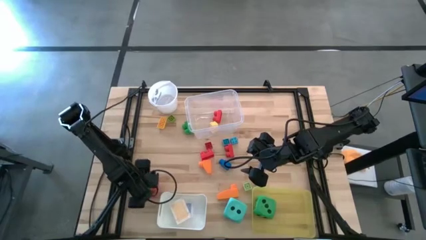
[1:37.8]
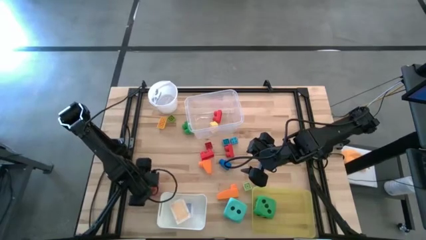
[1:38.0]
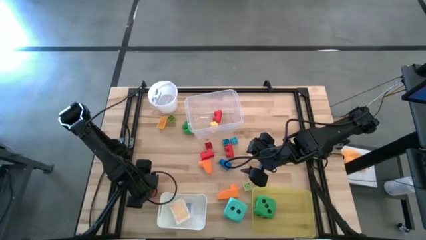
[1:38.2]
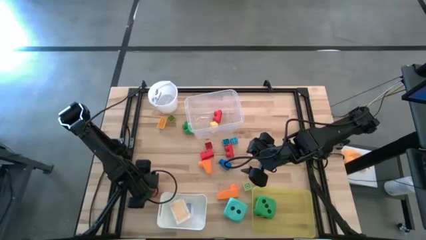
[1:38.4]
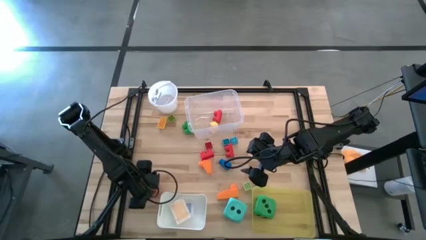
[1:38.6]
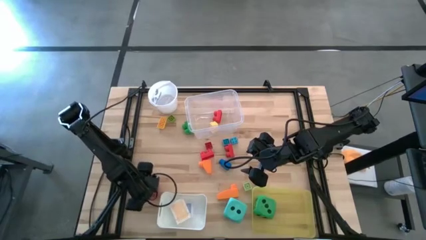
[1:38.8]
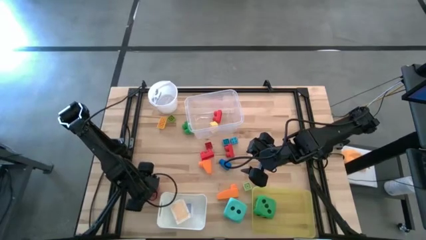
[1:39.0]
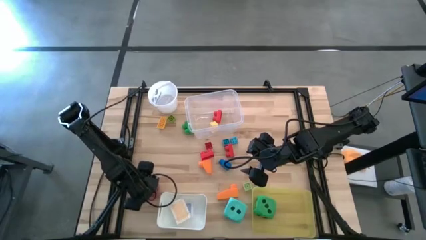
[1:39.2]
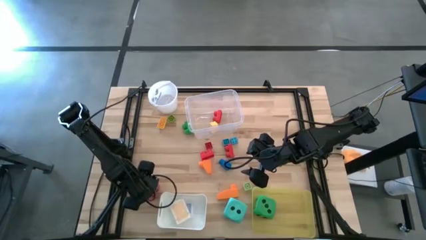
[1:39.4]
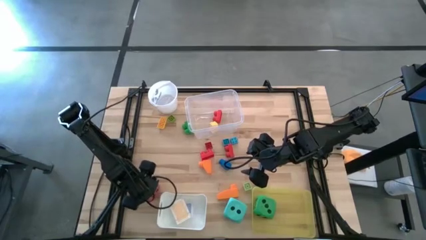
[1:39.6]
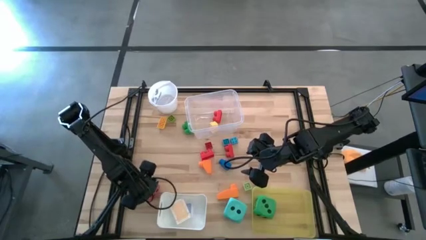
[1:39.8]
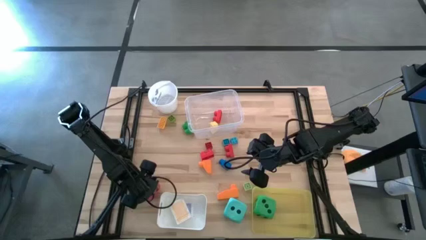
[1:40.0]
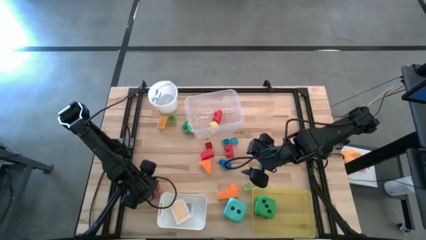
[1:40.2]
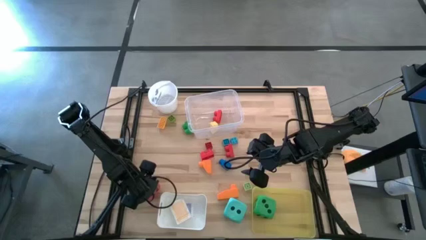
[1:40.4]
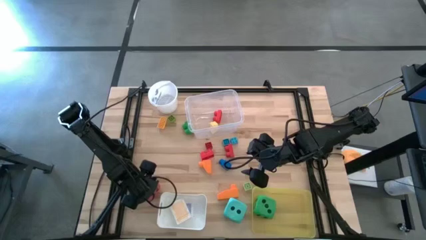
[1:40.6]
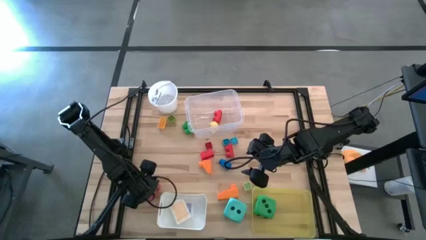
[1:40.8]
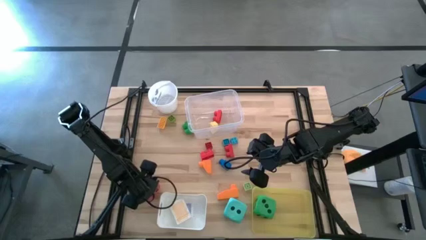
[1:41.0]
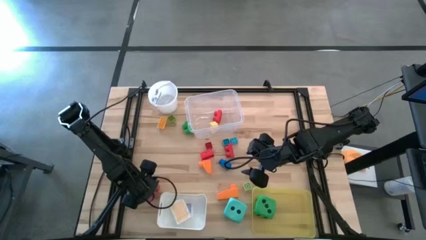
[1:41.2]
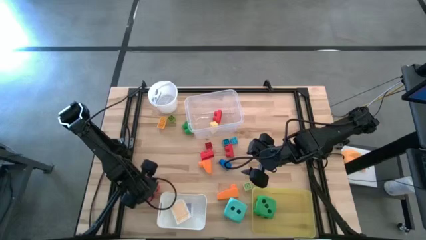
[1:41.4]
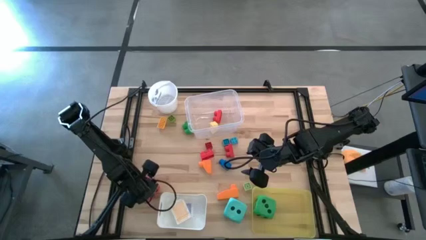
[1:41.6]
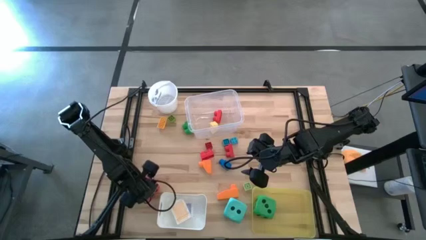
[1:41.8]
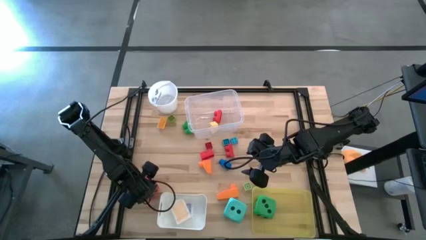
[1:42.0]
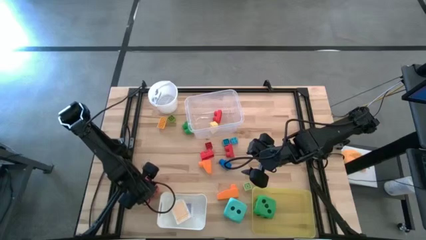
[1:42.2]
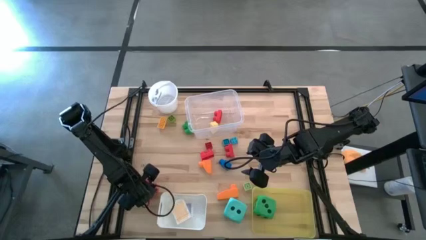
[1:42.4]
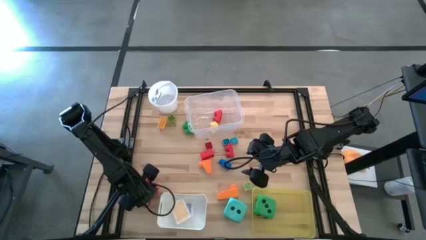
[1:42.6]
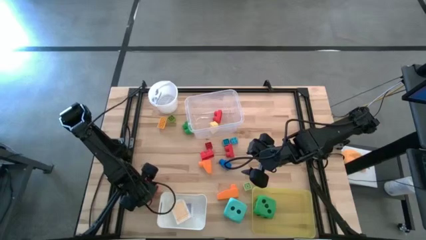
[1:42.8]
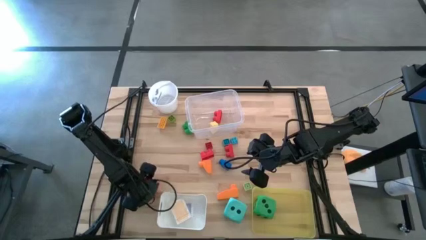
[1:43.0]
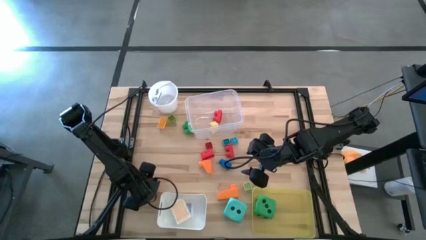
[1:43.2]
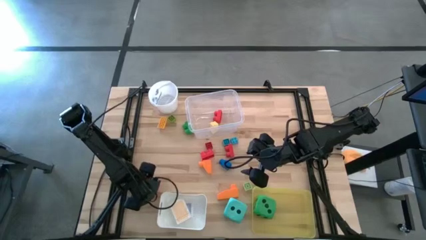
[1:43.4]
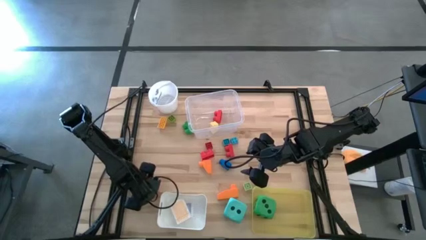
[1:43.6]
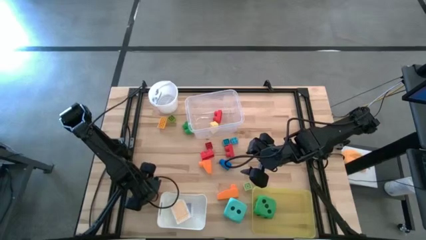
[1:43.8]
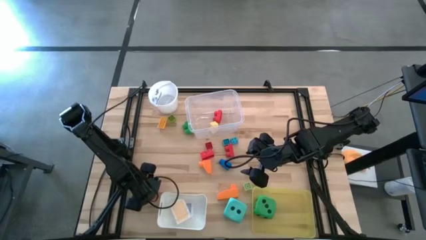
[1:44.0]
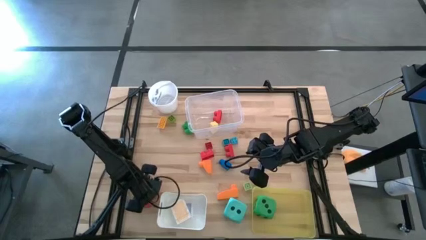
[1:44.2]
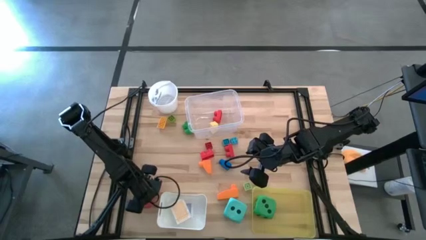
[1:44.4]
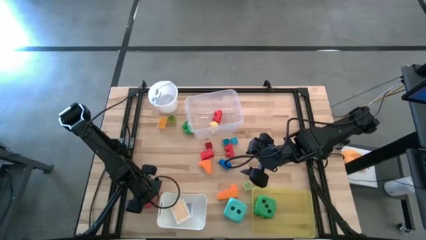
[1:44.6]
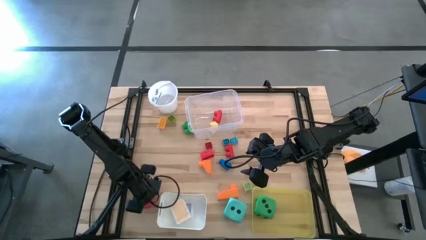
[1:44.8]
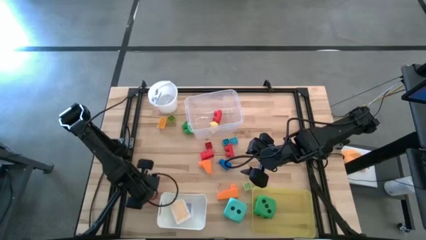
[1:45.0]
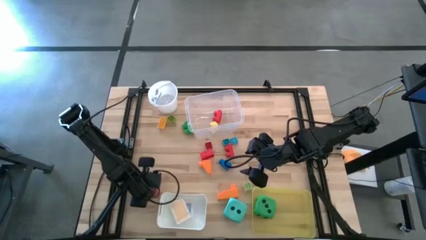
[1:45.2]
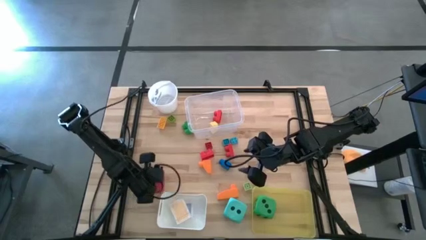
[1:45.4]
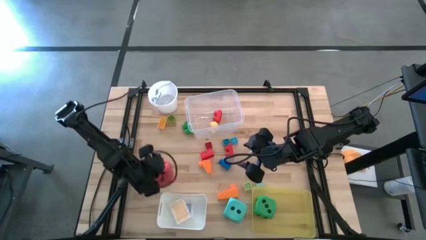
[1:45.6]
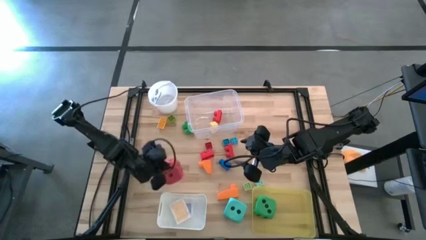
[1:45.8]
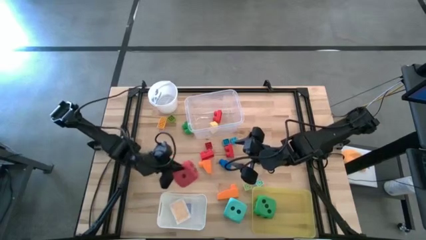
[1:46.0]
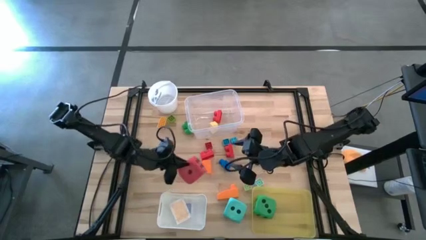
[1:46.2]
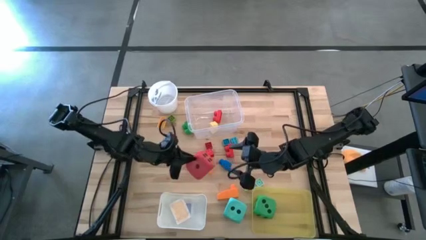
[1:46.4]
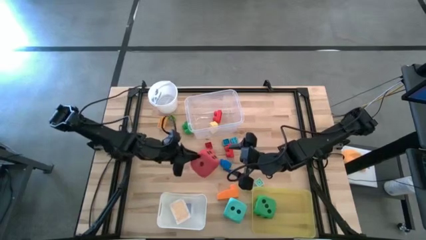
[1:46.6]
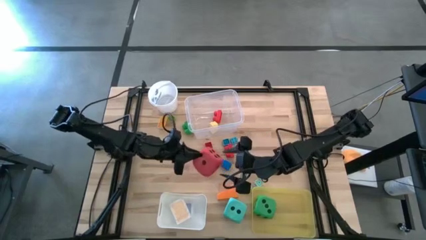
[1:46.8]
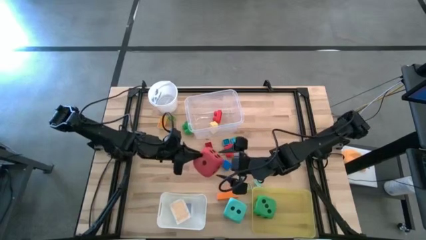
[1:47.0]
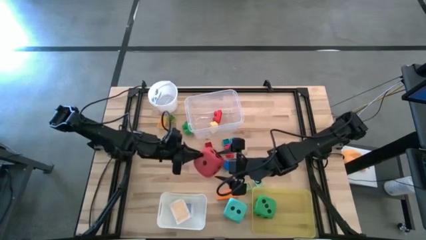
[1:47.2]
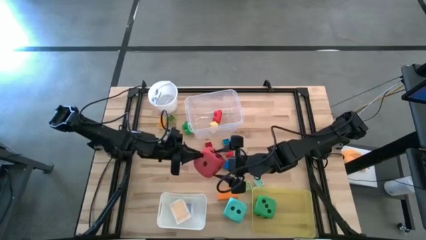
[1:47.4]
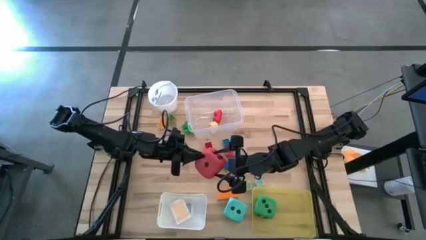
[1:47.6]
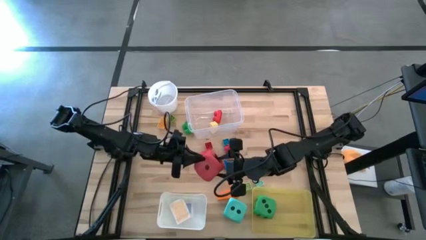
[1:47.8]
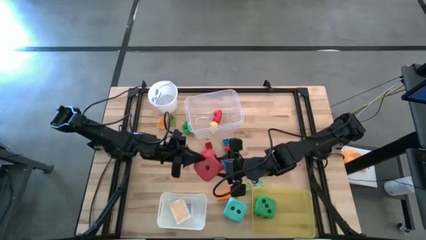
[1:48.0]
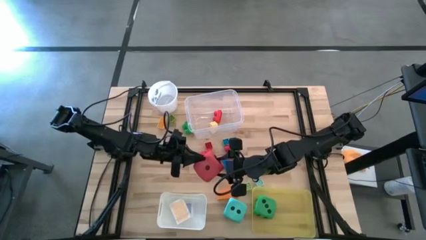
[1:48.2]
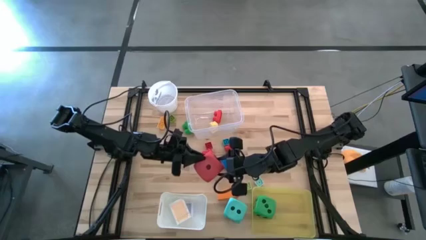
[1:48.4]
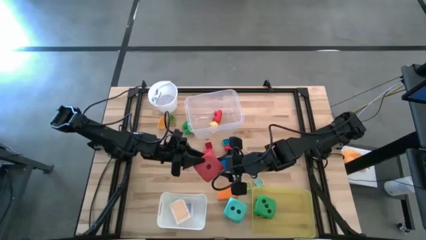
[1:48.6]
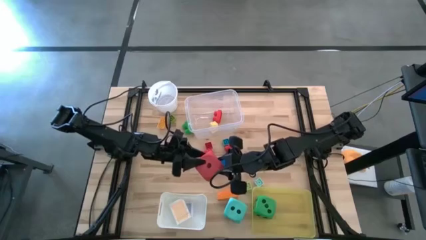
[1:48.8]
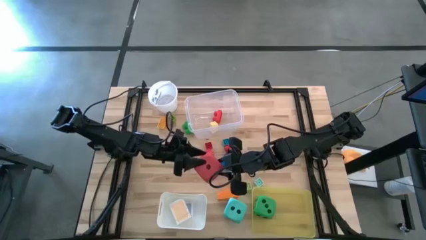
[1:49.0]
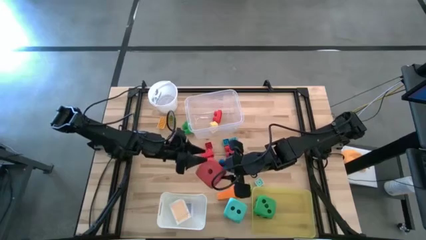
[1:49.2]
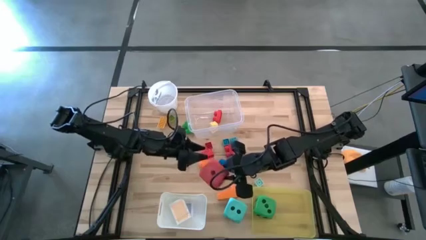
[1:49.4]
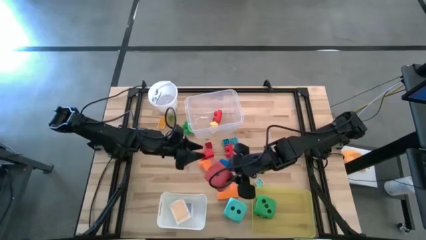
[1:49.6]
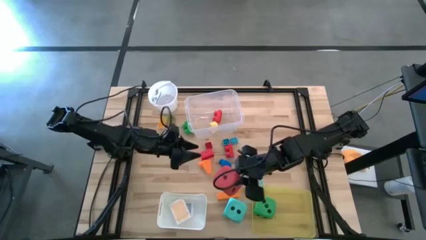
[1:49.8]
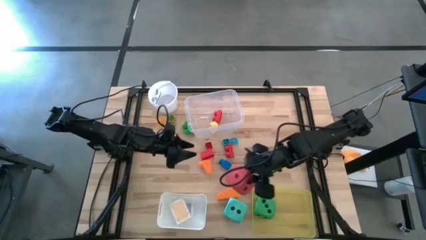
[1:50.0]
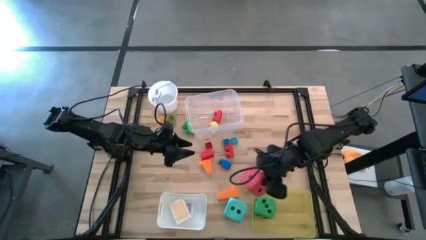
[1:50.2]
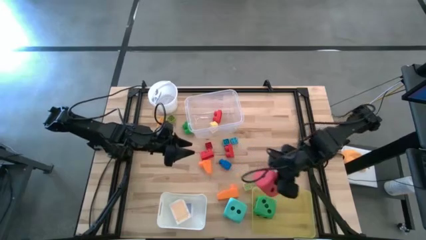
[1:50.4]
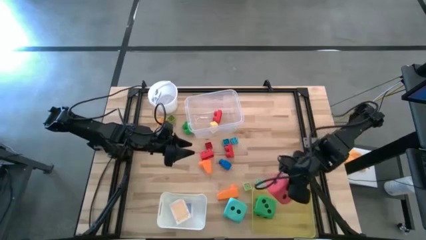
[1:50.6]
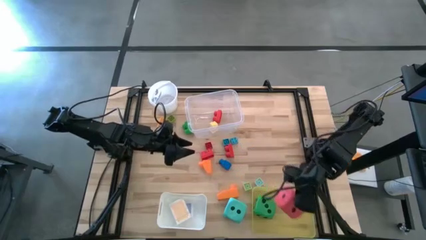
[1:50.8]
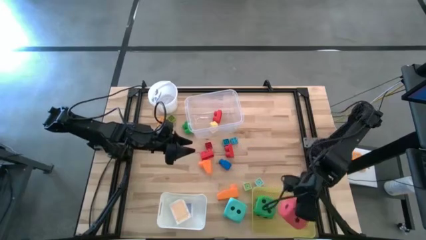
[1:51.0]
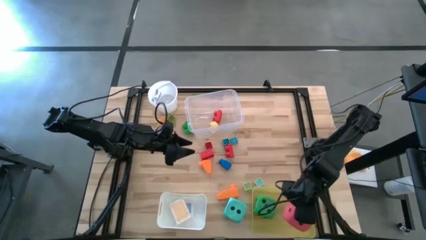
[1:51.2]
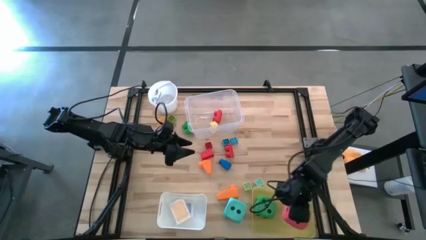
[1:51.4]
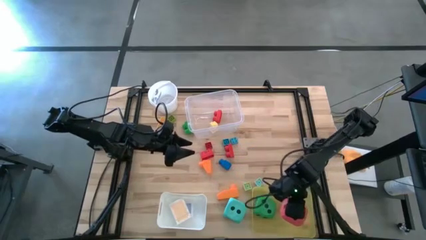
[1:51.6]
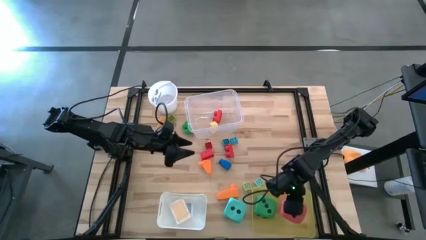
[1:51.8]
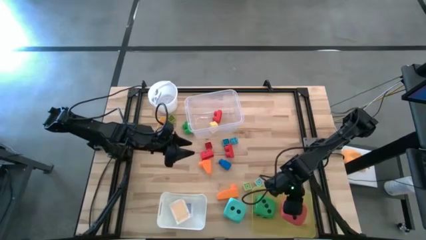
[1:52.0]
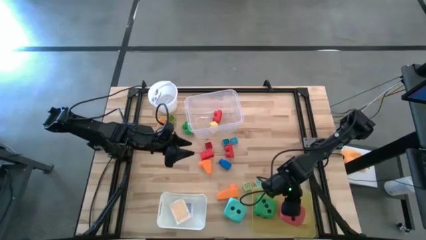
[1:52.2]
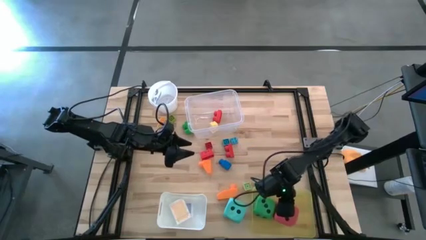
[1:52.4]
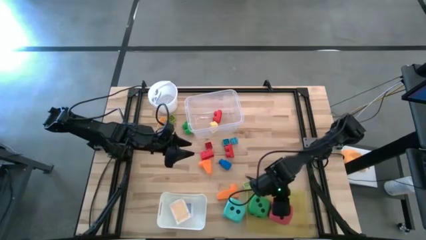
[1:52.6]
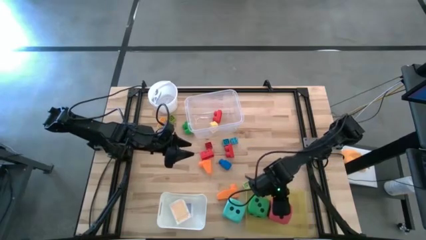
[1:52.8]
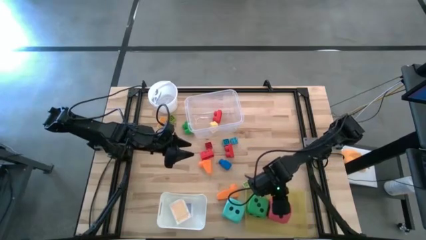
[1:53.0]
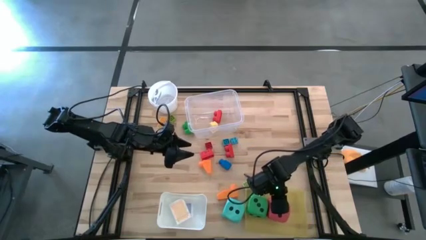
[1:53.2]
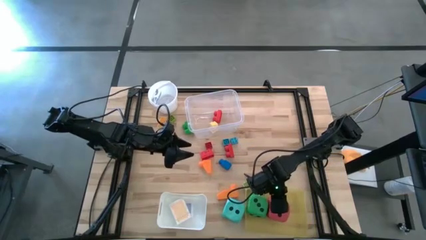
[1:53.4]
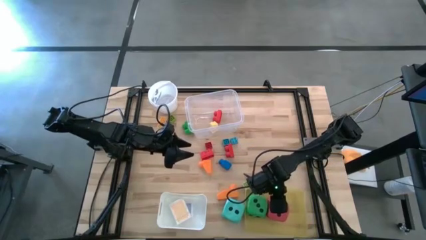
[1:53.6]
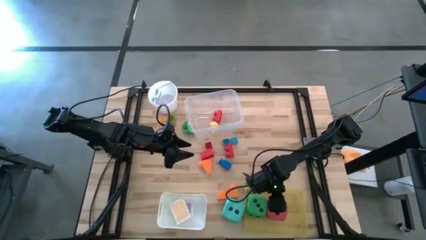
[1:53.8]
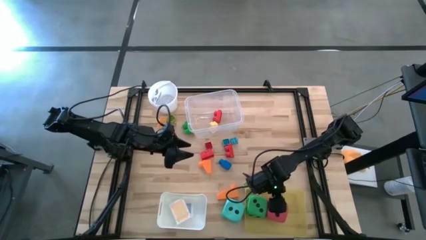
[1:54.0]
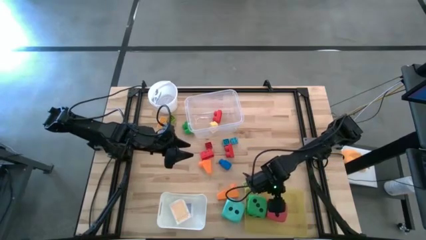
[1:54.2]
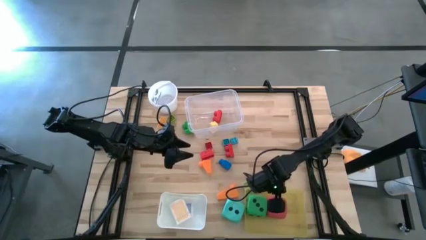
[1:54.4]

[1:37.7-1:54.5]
Task: Pick & Place Toys
Put the red dice into the yellow bin
